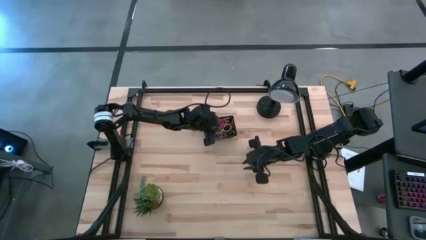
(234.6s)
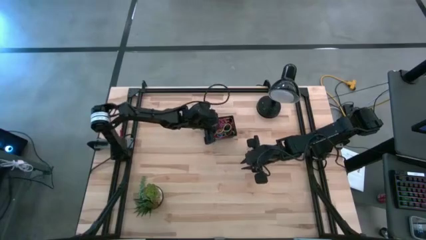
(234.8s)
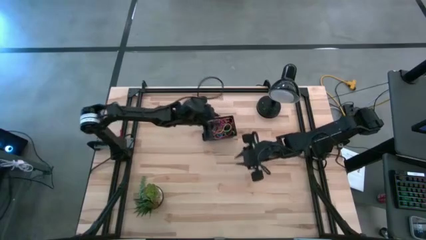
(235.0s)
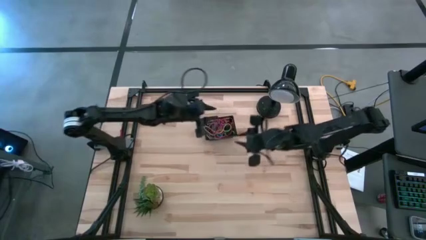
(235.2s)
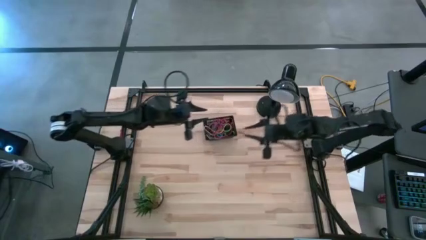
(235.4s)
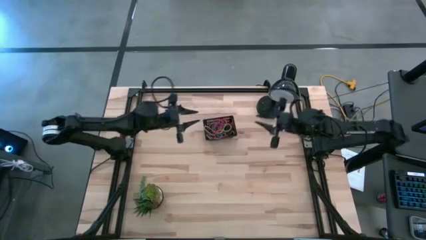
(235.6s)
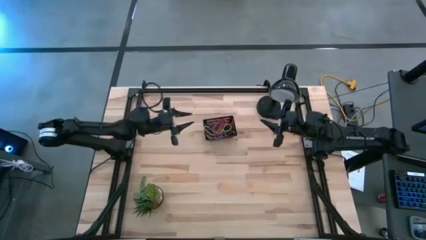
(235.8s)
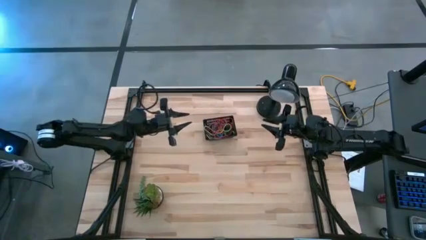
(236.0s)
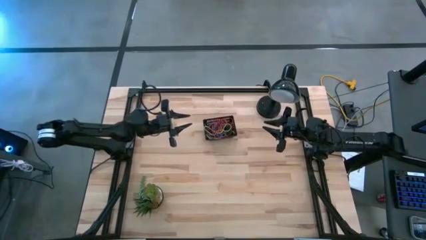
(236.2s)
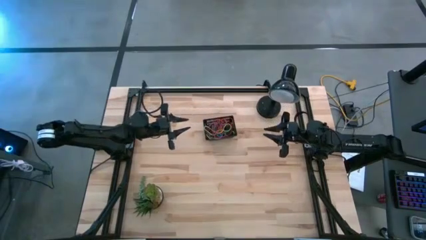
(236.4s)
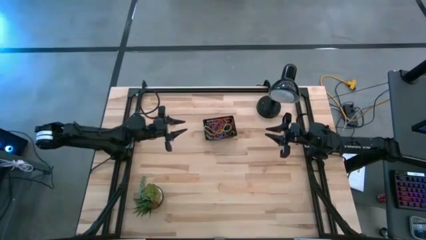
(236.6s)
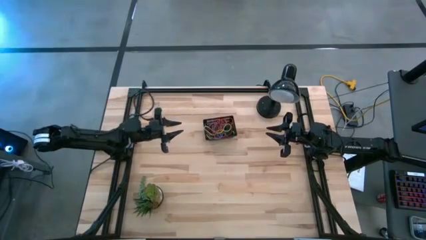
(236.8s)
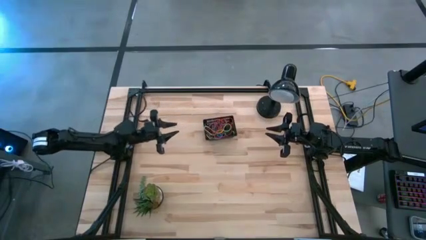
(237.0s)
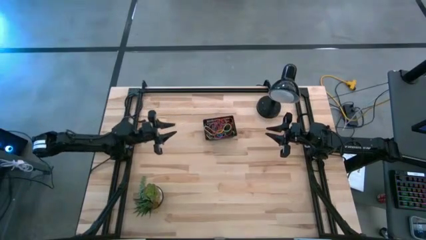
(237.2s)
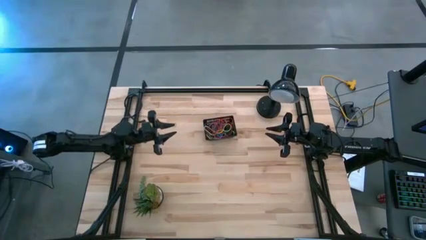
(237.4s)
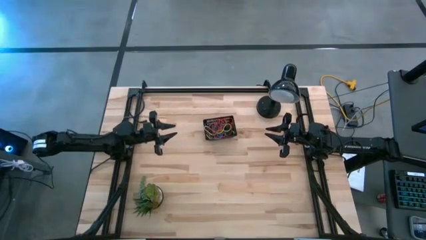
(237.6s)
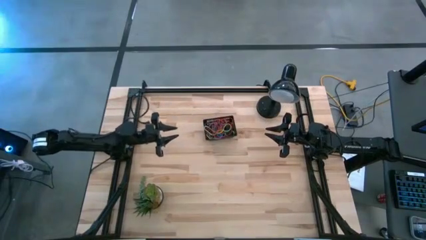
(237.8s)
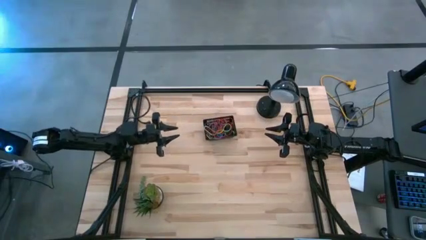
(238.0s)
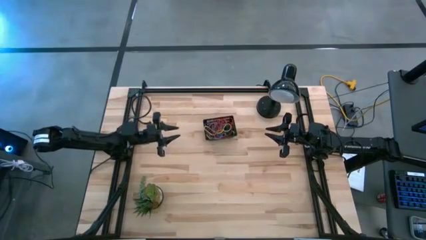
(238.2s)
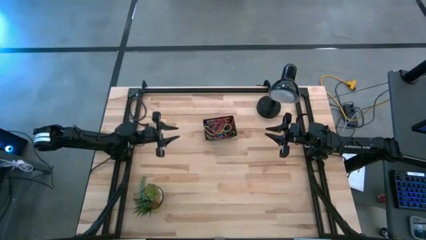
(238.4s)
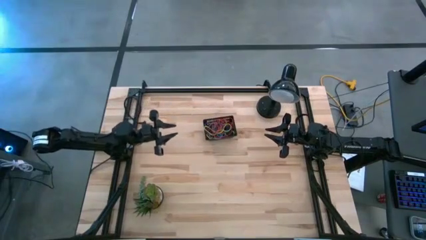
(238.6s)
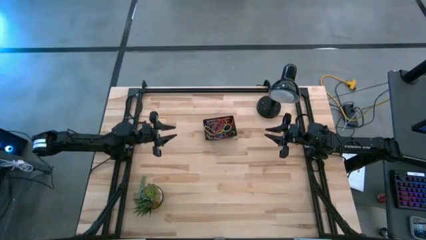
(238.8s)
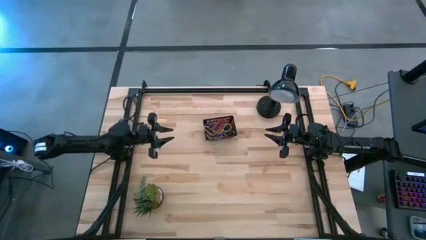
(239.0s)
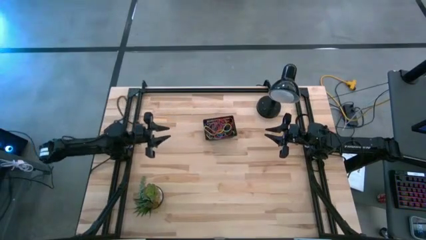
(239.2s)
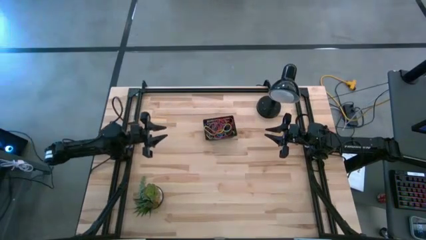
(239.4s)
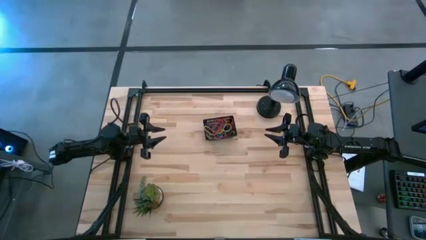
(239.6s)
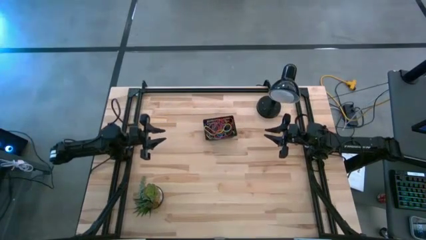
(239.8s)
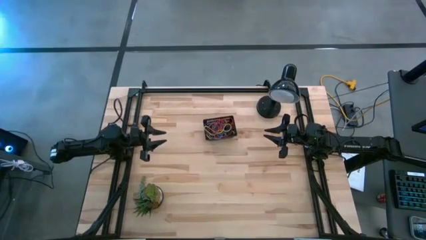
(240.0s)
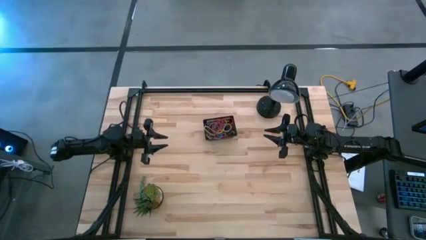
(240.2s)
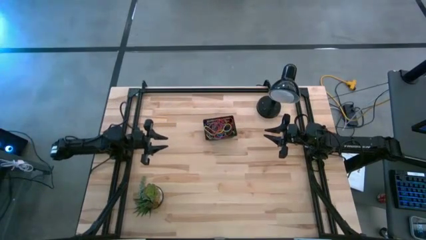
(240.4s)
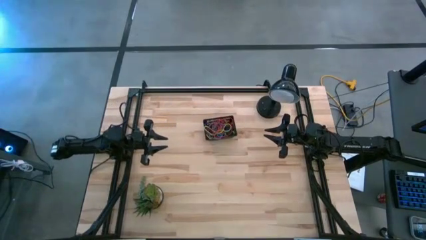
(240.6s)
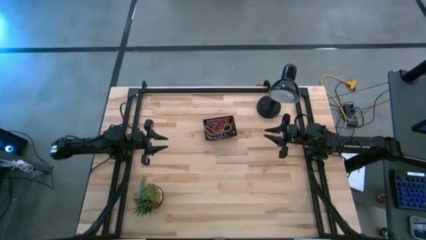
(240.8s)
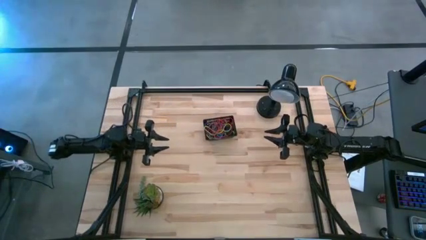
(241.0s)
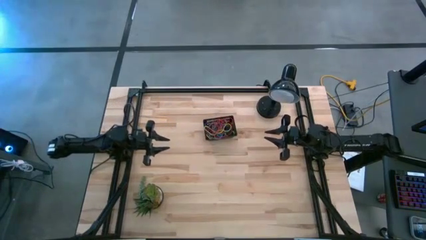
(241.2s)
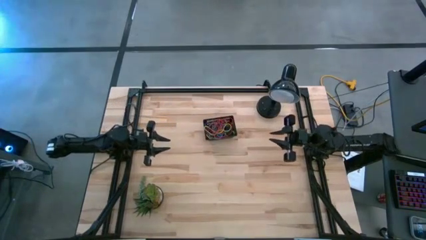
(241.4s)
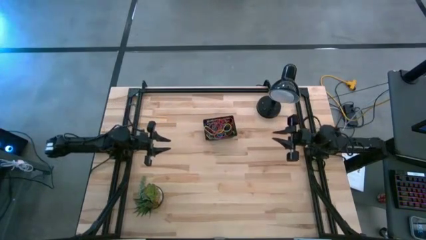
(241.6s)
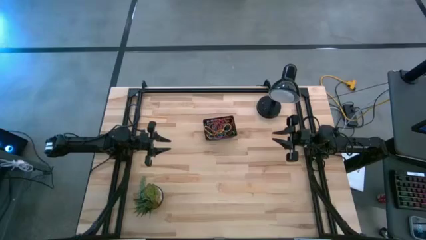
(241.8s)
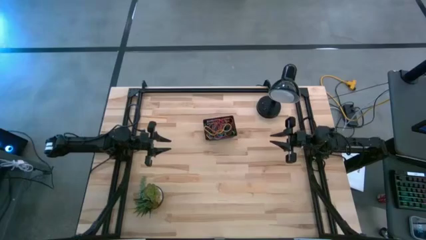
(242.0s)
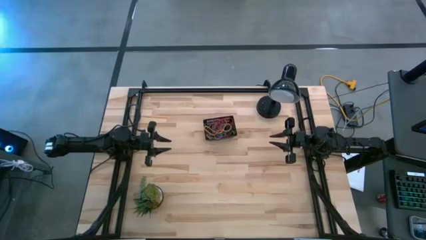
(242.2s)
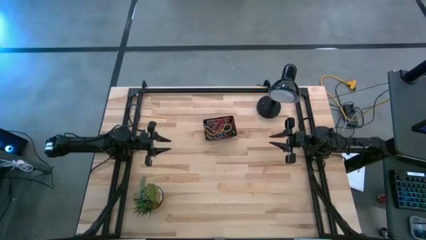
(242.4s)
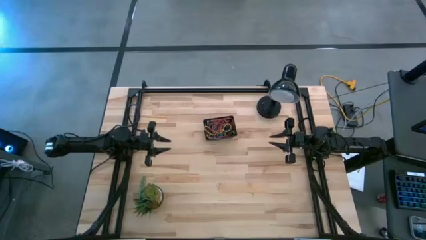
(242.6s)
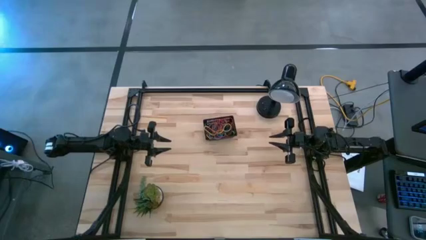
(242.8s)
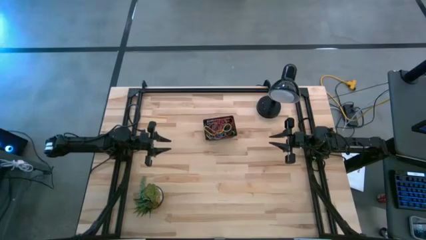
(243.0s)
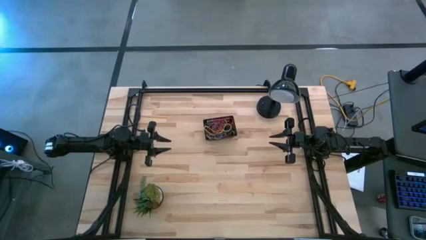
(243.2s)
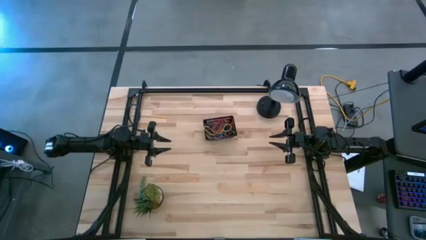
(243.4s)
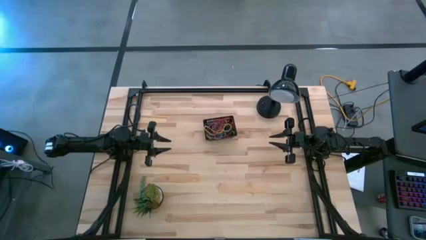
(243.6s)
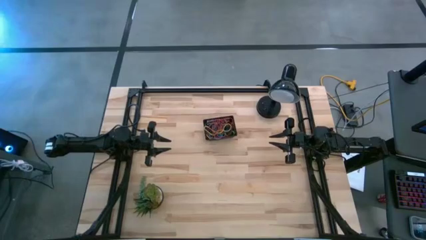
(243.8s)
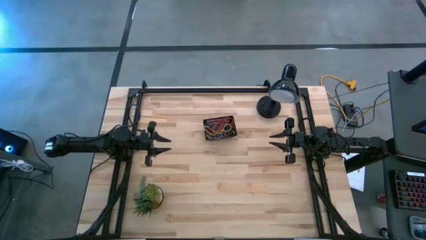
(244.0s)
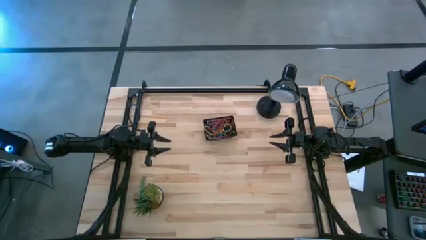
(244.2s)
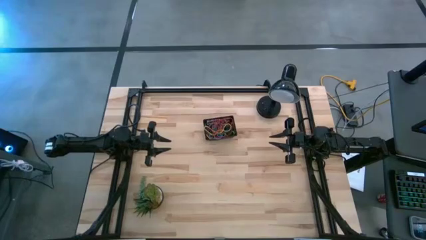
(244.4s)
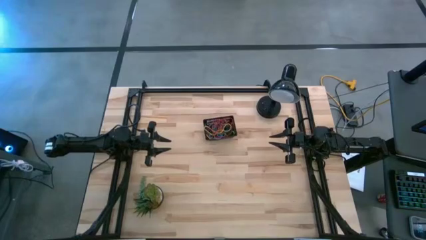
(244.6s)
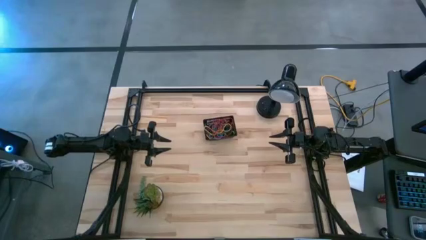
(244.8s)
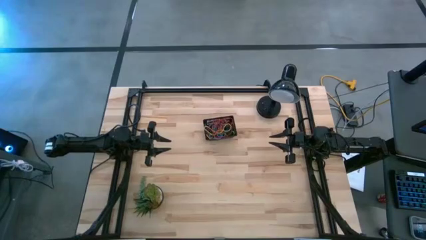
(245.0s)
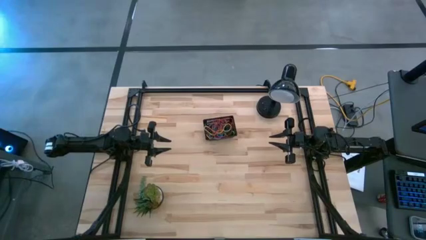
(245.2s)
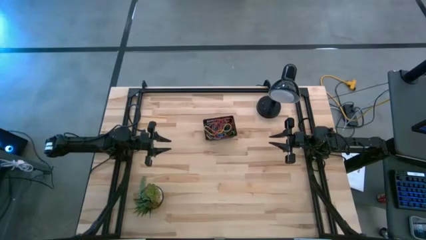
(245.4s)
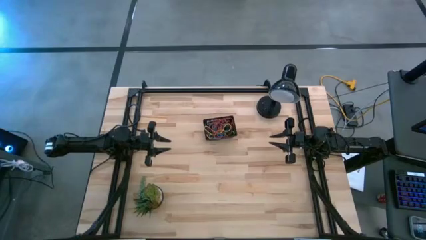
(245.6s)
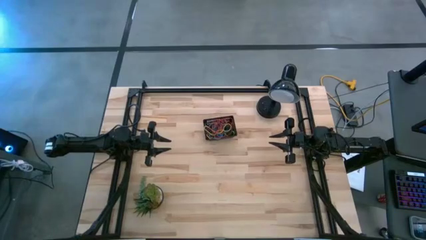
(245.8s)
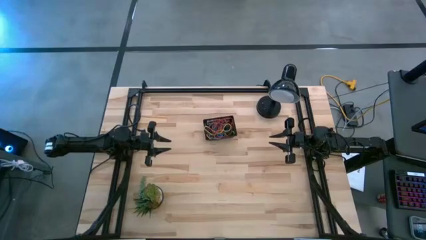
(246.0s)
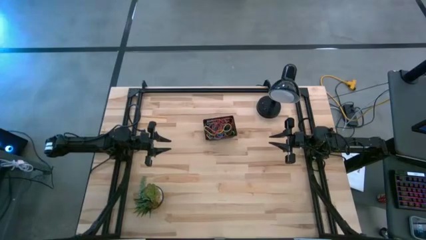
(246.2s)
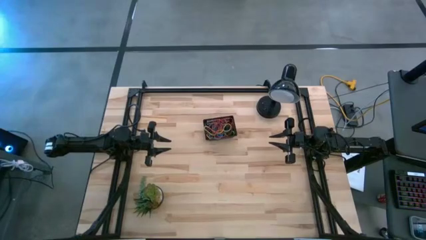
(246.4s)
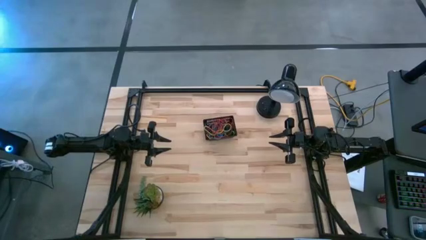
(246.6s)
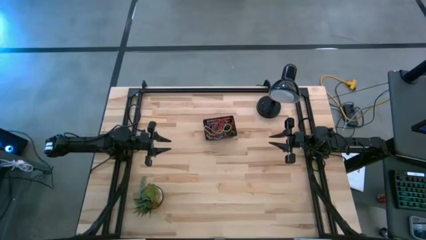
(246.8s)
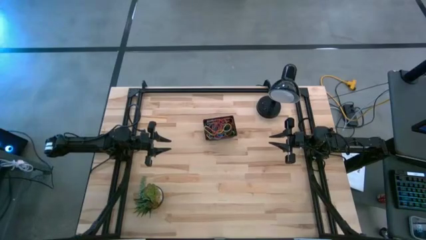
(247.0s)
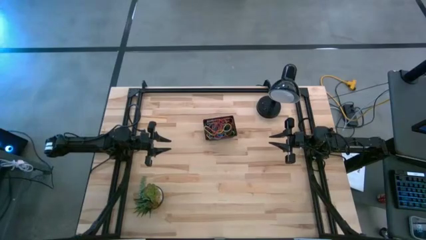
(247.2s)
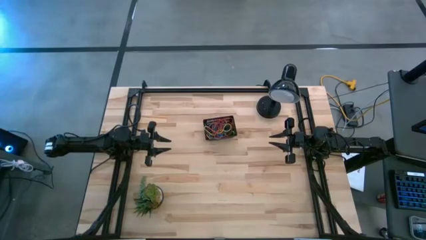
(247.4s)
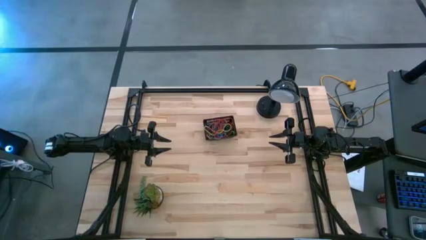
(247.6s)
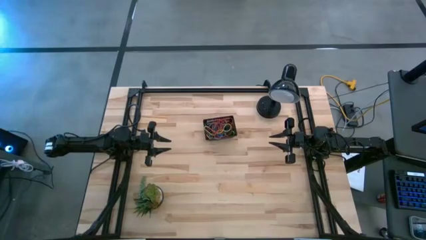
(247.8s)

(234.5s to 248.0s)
Task: Pick and place rubber bands into bin
Return to Home Position
